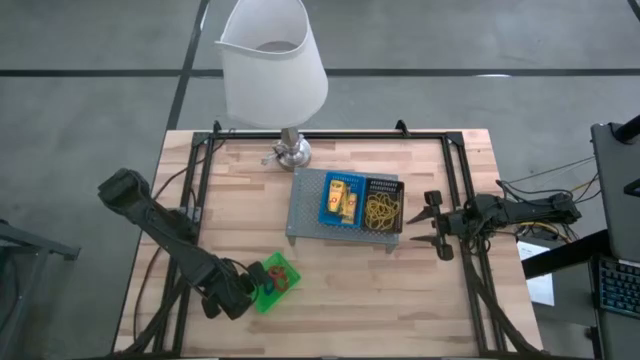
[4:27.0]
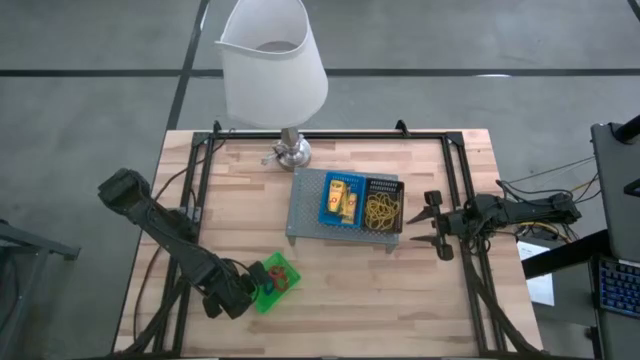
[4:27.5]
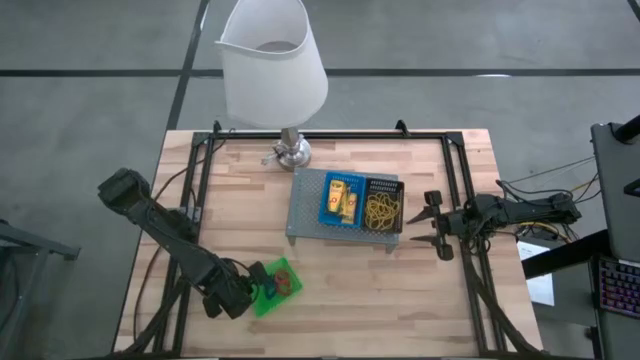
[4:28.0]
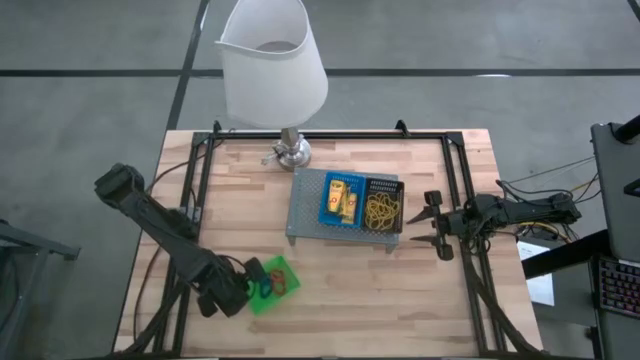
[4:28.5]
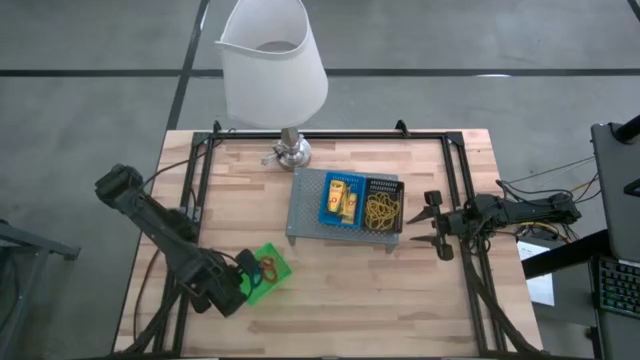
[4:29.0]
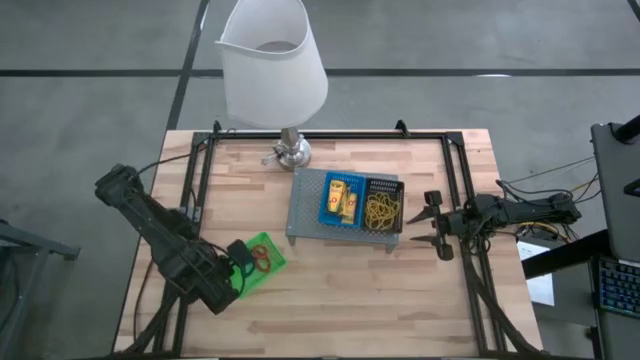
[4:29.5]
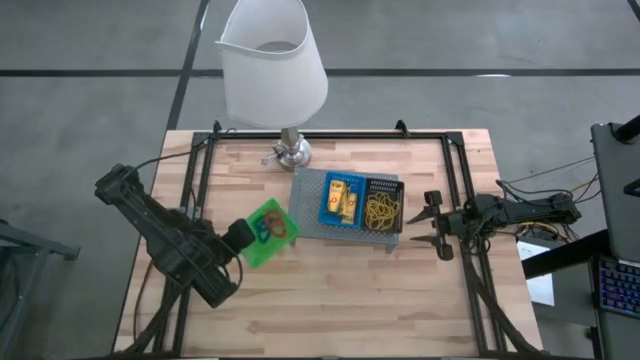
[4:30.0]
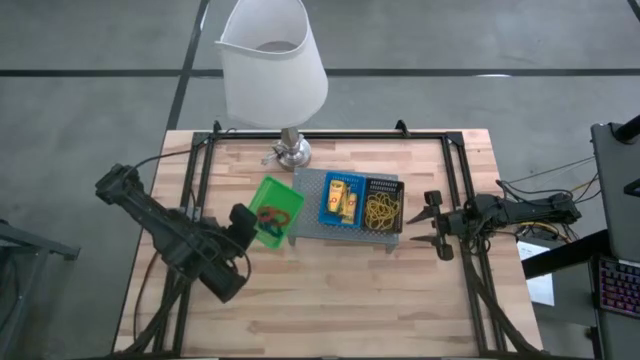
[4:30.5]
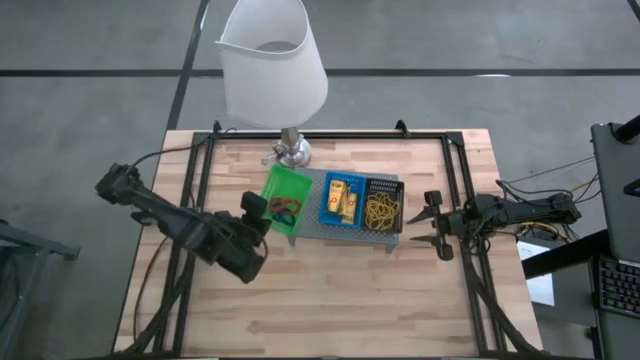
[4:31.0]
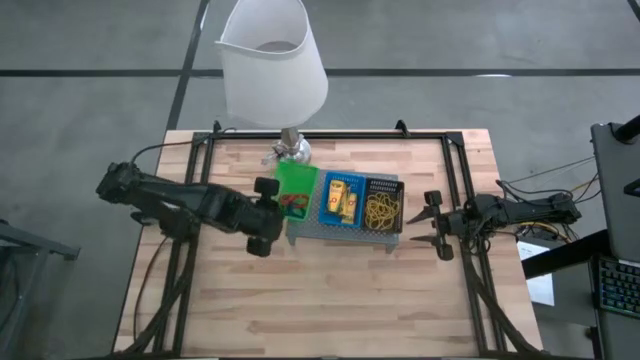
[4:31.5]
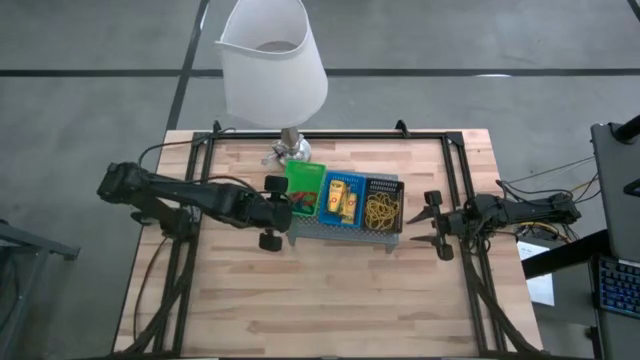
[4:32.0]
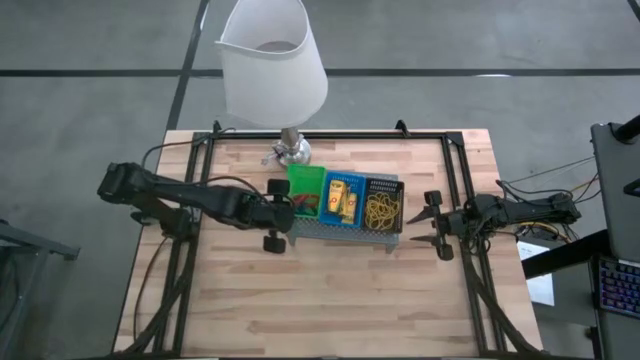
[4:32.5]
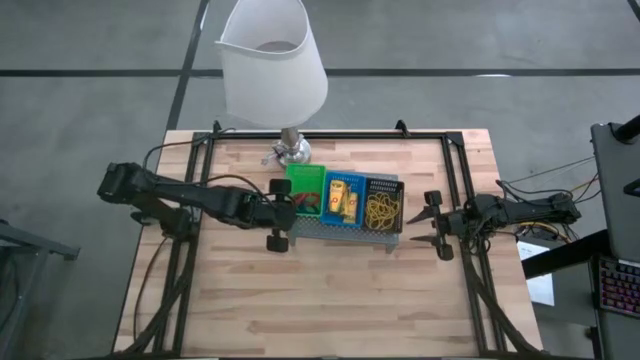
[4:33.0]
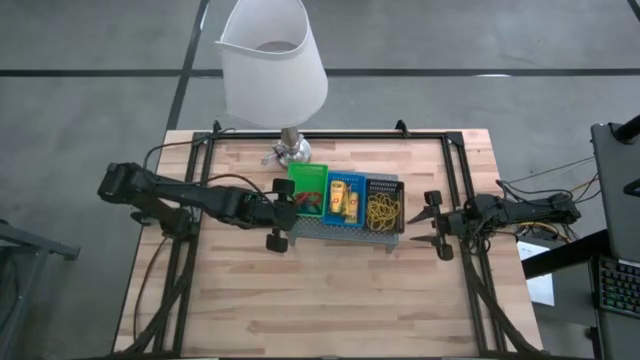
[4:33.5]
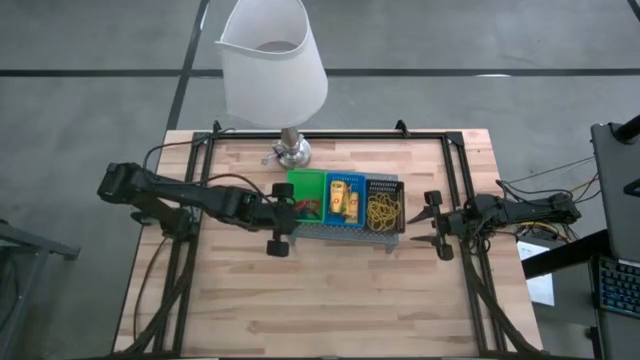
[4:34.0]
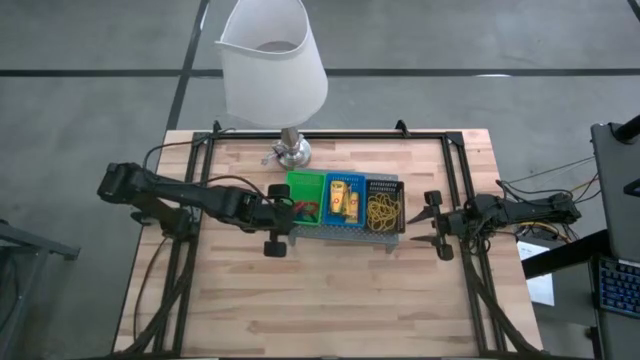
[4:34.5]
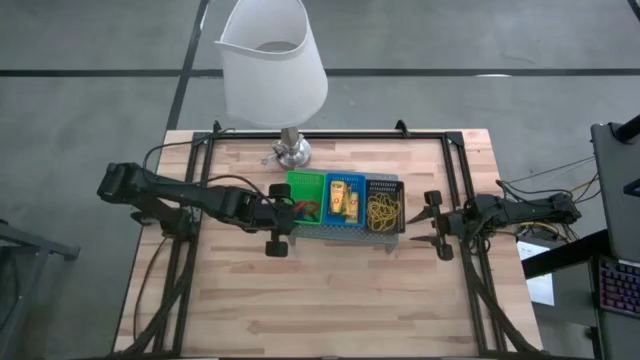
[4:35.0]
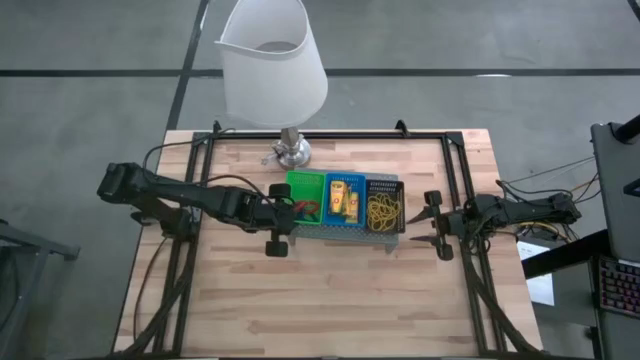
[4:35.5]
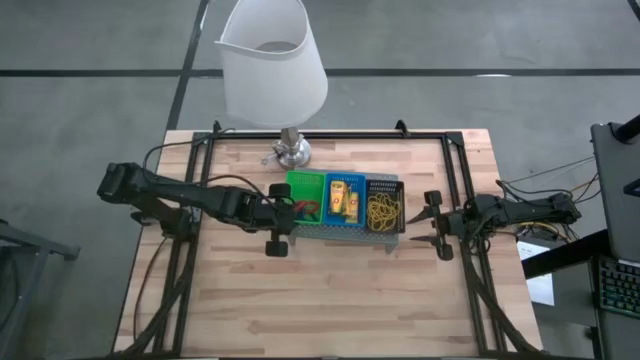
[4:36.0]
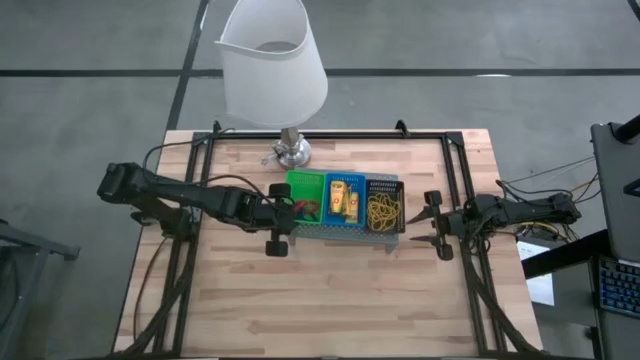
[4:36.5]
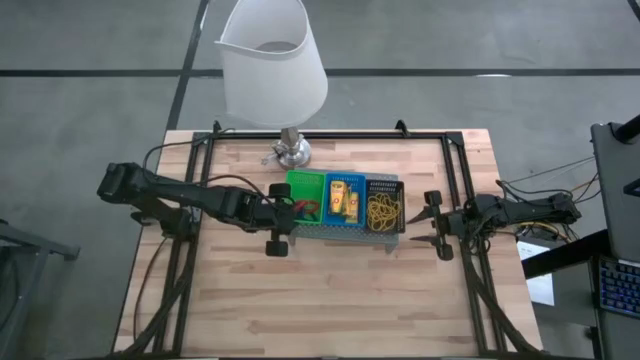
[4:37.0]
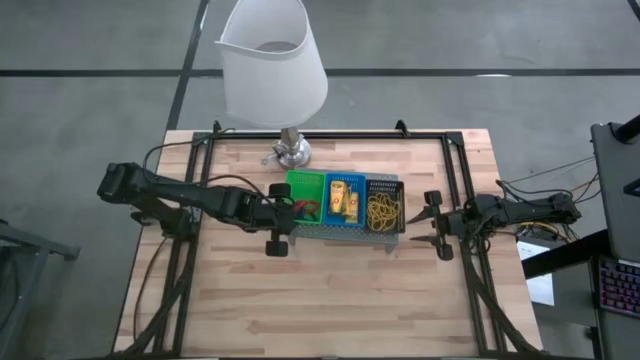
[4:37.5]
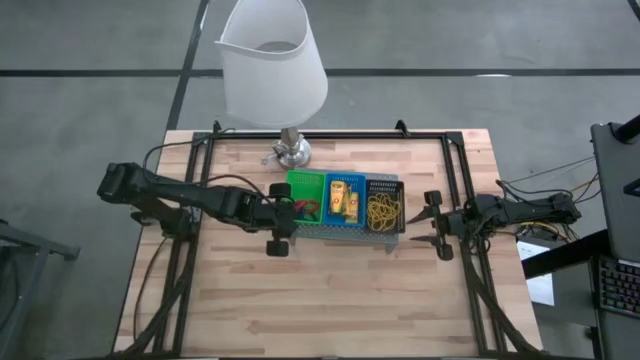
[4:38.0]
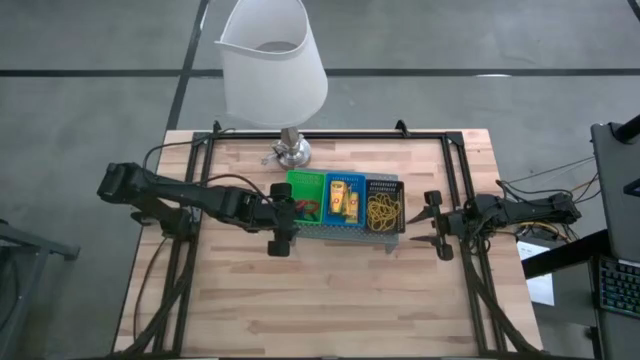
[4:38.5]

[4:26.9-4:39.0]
Task: Pick & Place Office Desk Supplies
Put the green basket on the shelf

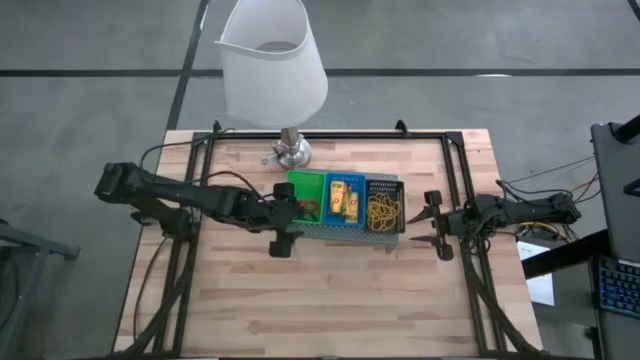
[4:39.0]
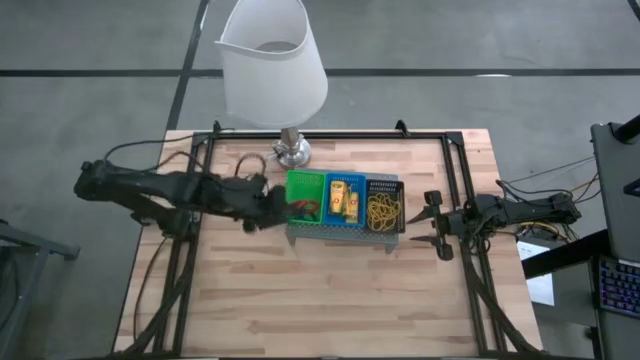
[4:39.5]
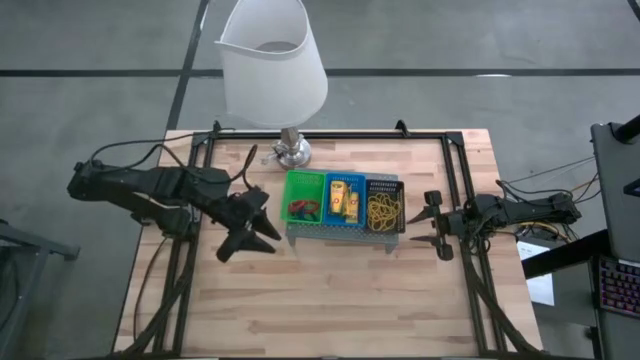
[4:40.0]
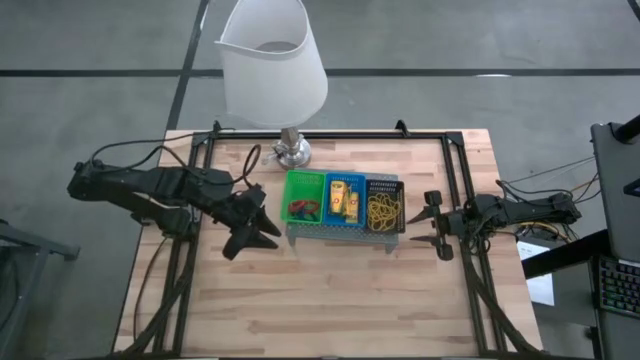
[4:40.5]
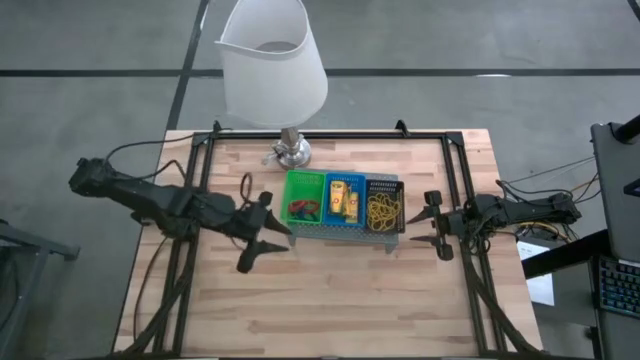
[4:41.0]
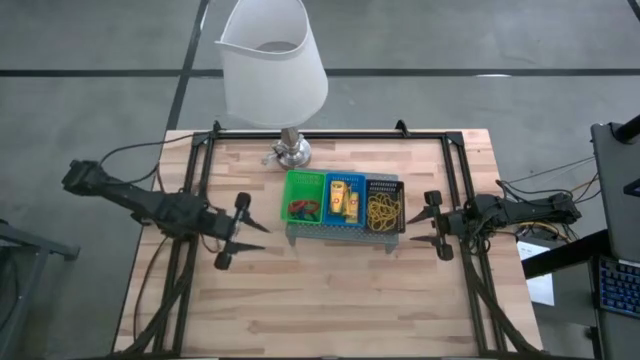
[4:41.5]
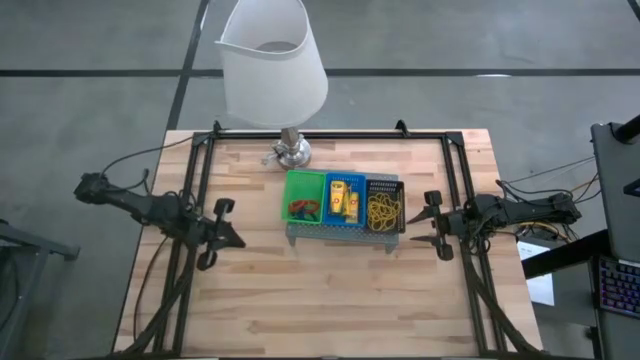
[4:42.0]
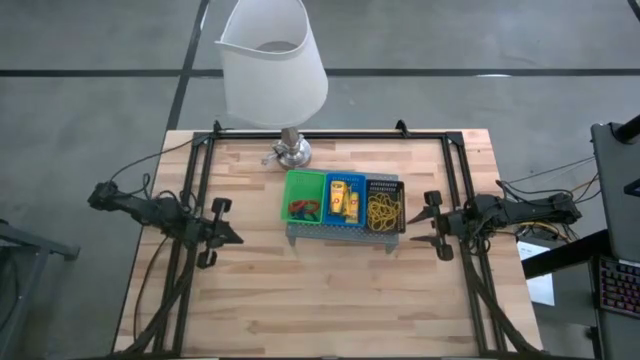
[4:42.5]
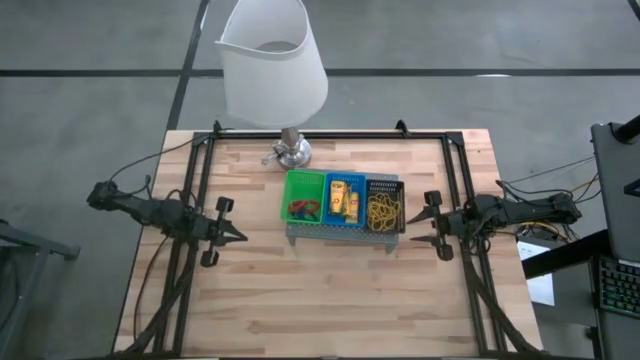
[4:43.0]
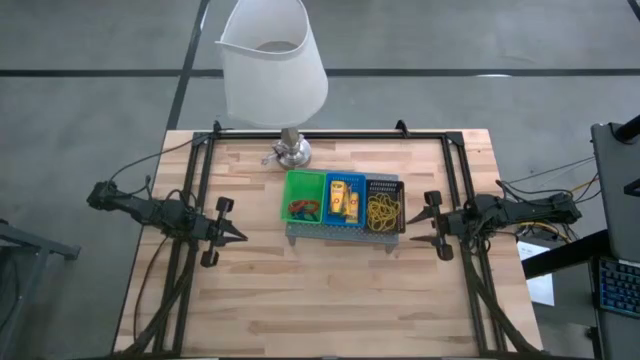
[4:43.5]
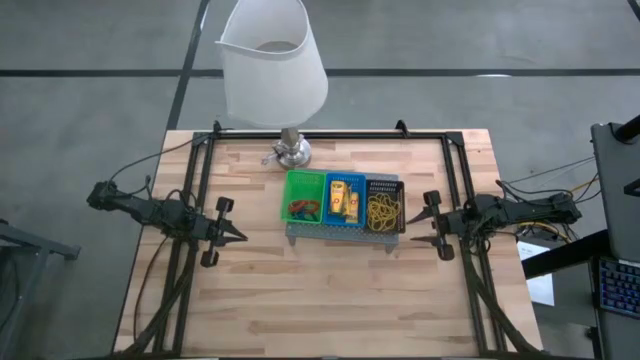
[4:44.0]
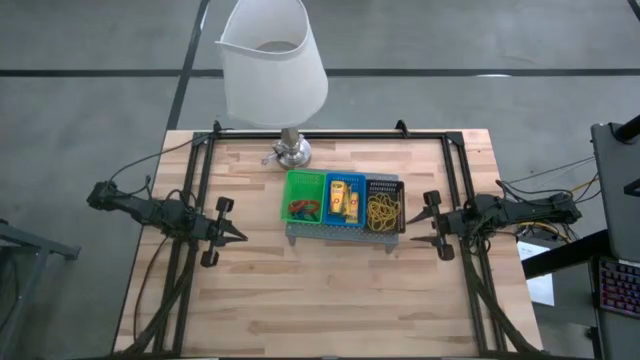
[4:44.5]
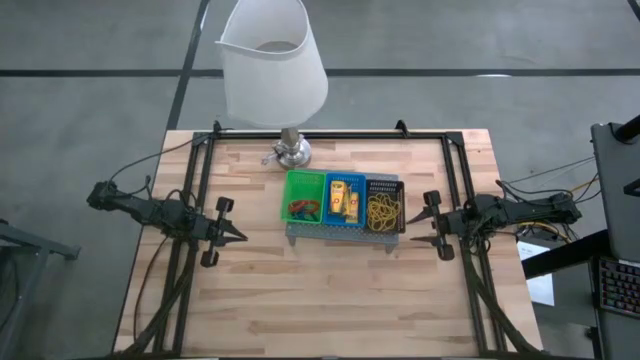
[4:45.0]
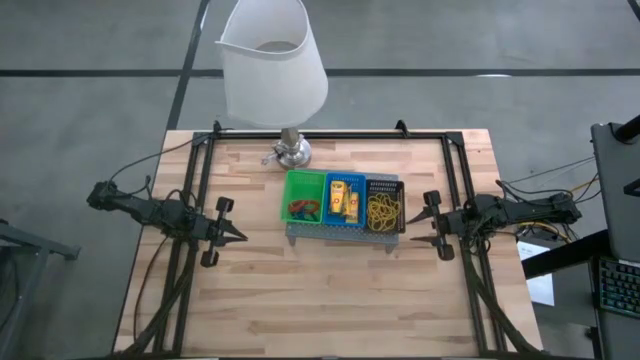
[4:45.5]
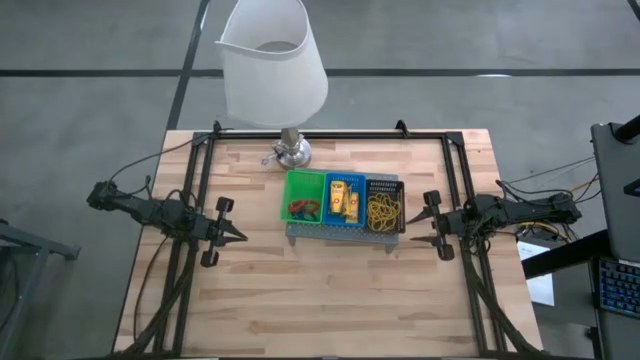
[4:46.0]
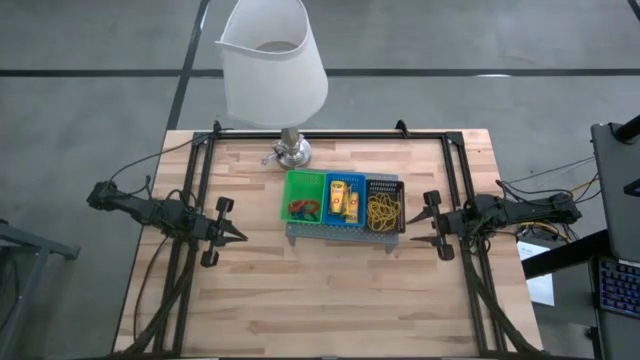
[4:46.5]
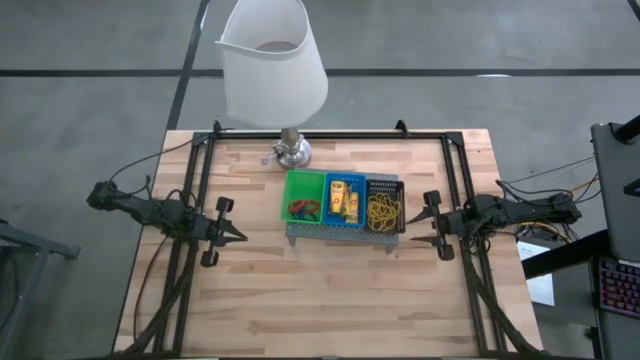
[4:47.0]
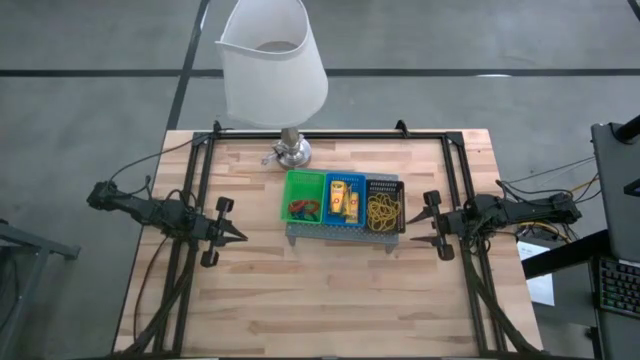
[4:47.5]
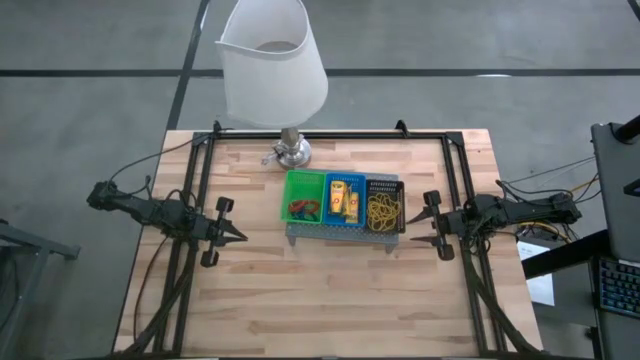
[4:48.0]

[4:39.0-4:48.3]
Return to Home Position

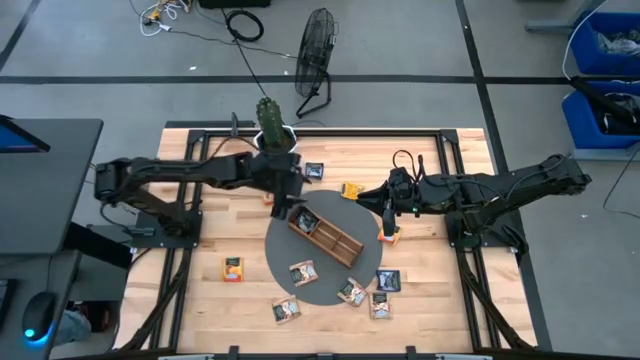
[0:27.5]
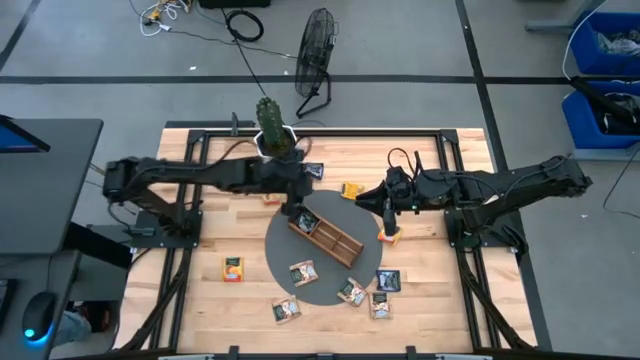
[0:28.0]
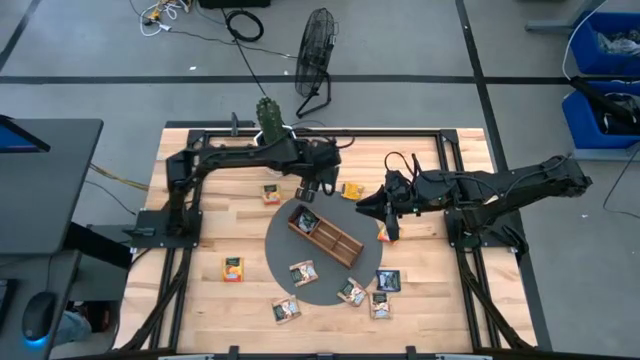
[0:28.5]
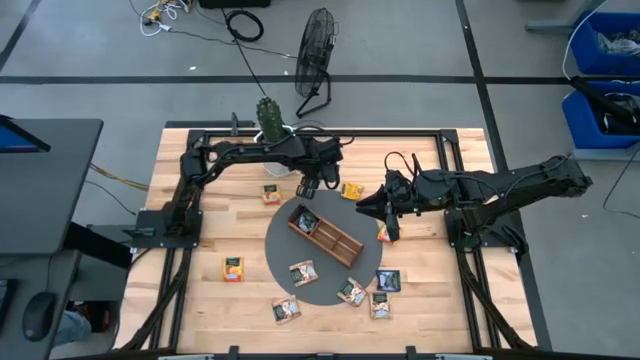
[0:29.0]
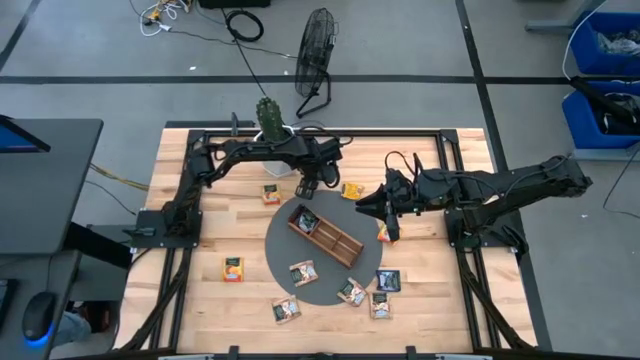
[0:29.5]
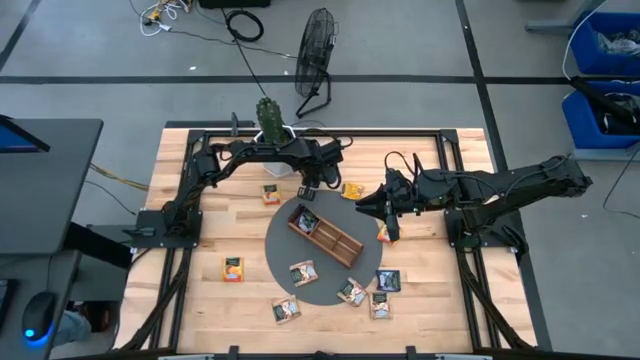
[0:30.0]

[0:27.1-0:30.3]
Task: Pick & Place Tea
Put the purple tea bag into the left section of the wooden organizer
